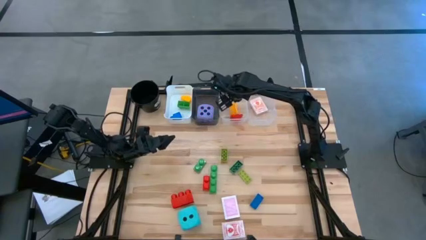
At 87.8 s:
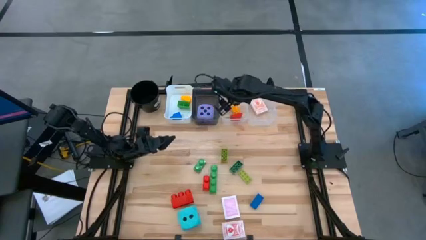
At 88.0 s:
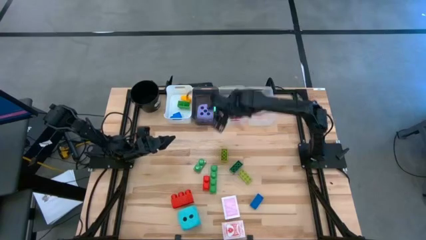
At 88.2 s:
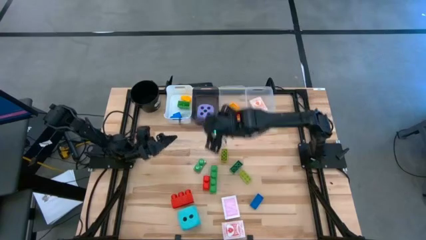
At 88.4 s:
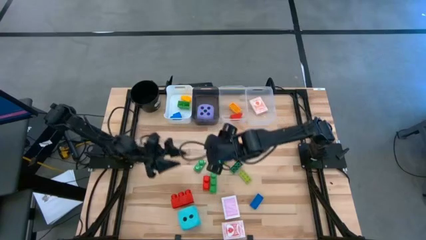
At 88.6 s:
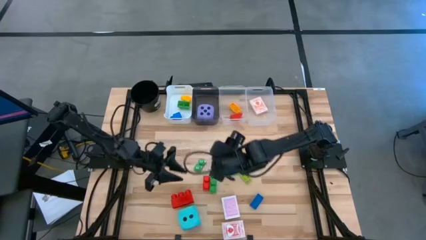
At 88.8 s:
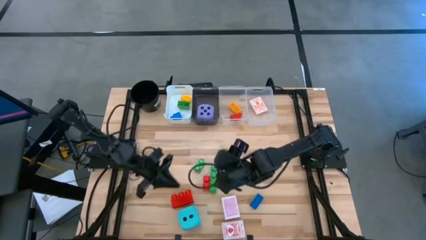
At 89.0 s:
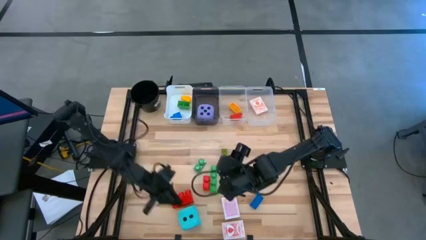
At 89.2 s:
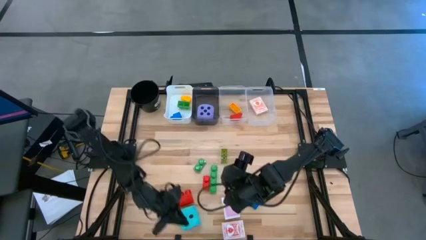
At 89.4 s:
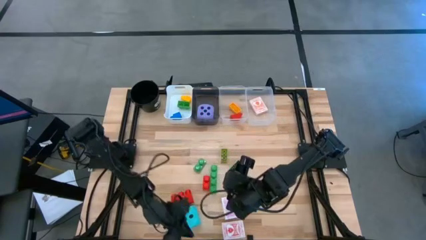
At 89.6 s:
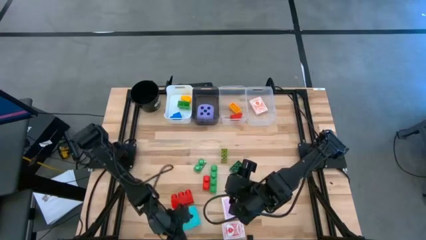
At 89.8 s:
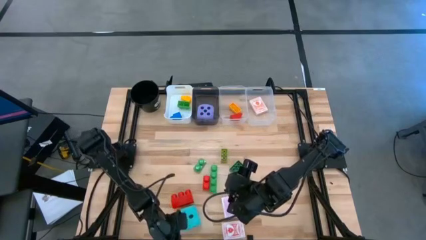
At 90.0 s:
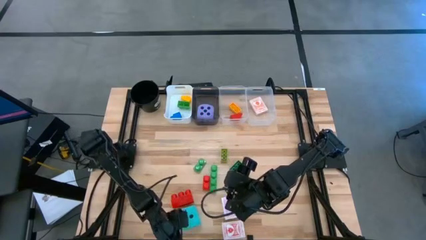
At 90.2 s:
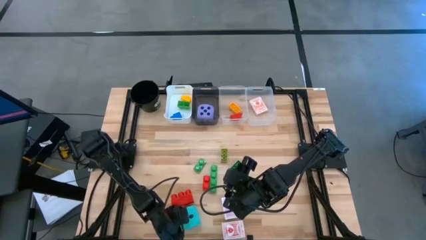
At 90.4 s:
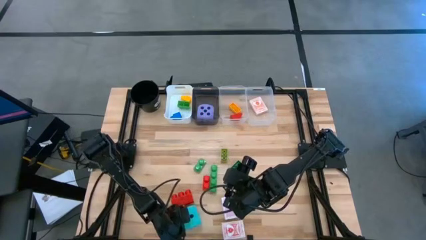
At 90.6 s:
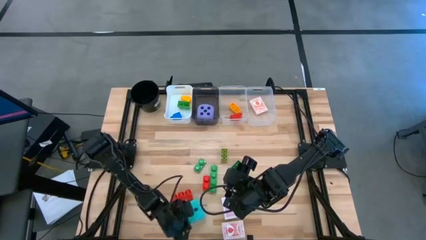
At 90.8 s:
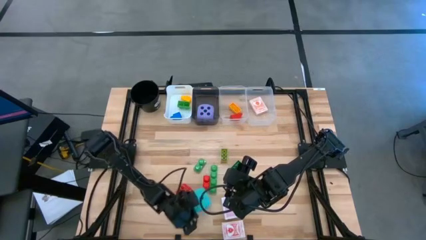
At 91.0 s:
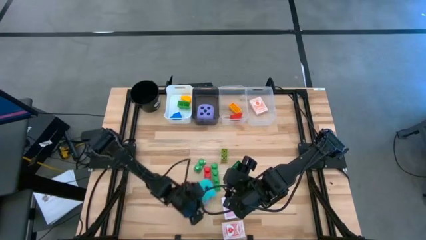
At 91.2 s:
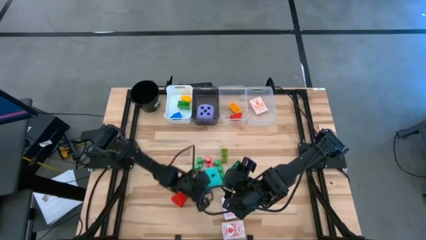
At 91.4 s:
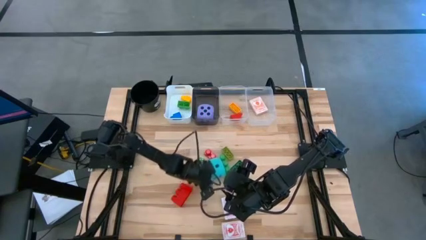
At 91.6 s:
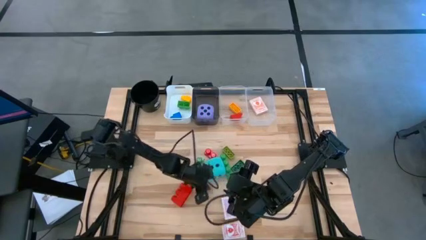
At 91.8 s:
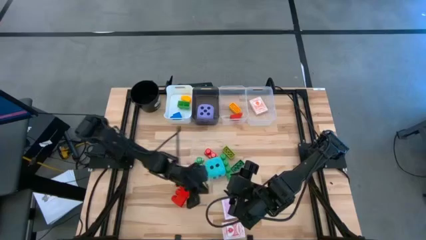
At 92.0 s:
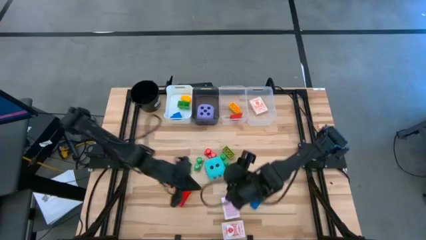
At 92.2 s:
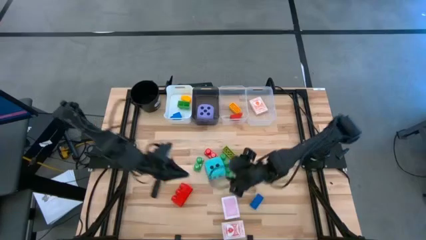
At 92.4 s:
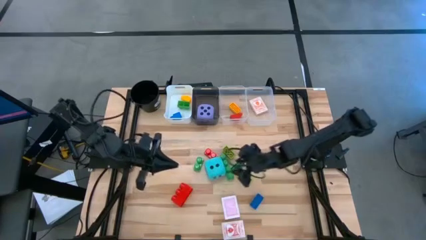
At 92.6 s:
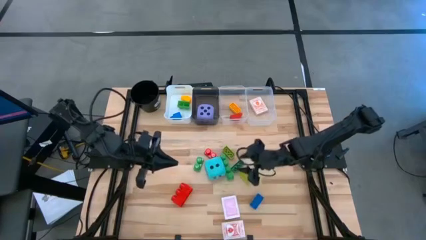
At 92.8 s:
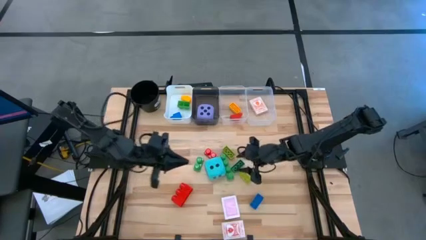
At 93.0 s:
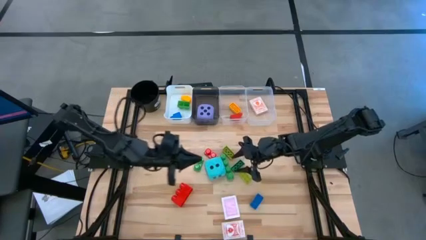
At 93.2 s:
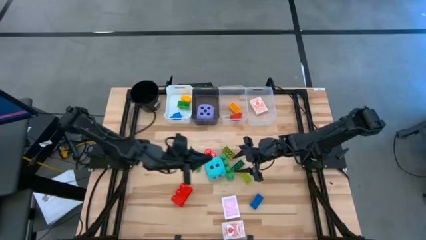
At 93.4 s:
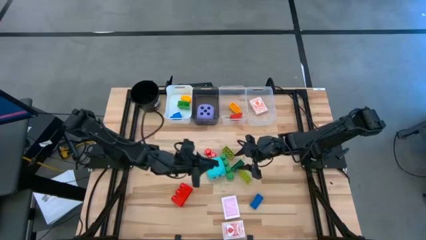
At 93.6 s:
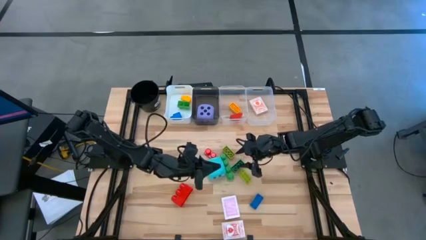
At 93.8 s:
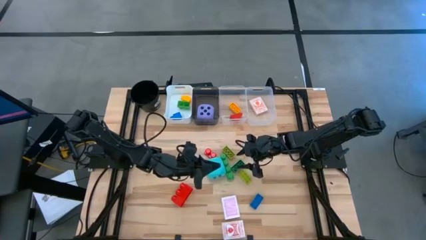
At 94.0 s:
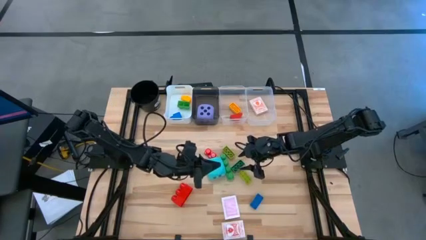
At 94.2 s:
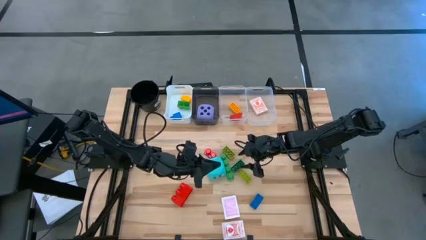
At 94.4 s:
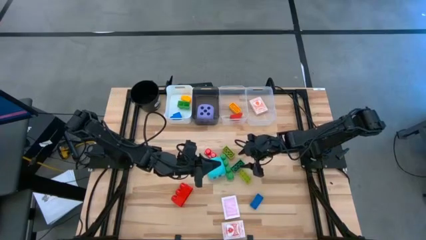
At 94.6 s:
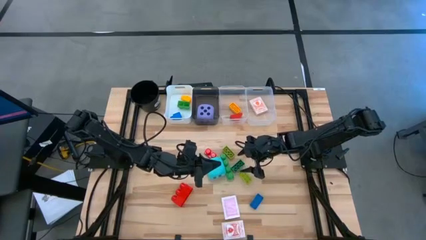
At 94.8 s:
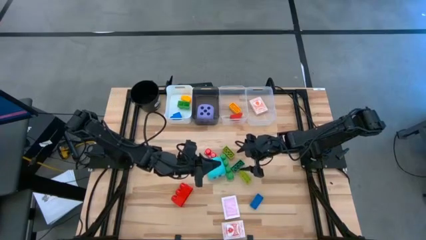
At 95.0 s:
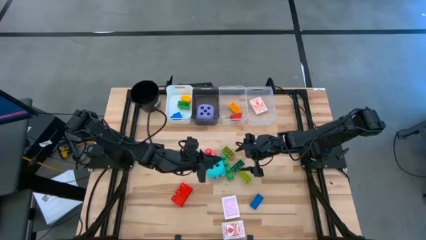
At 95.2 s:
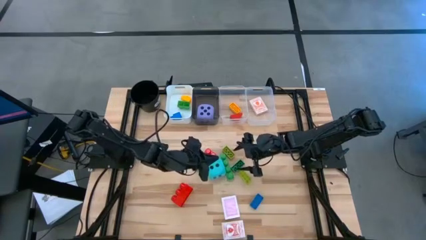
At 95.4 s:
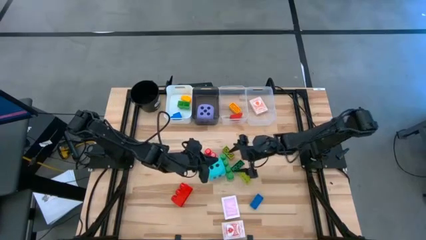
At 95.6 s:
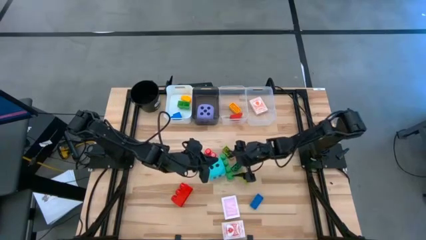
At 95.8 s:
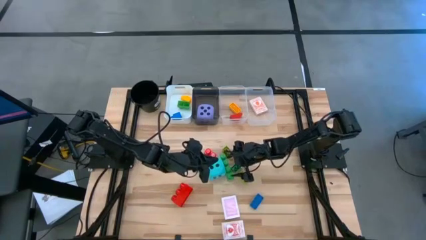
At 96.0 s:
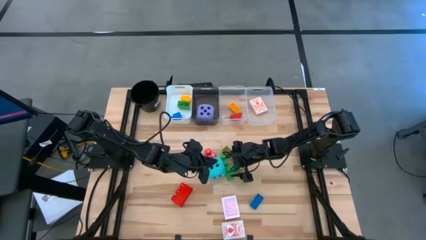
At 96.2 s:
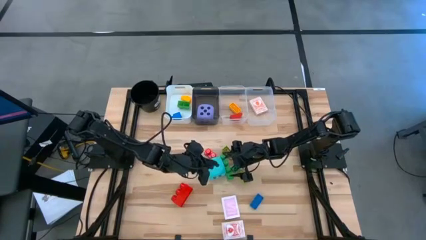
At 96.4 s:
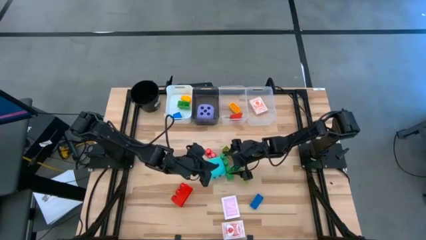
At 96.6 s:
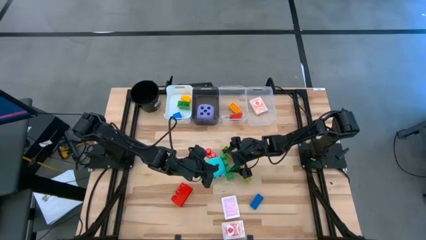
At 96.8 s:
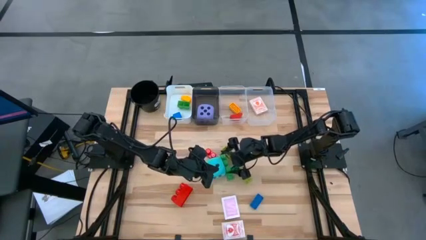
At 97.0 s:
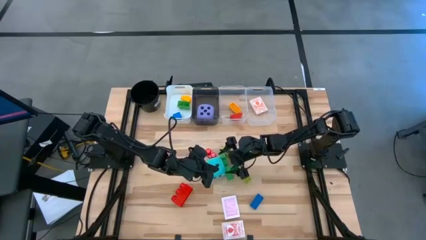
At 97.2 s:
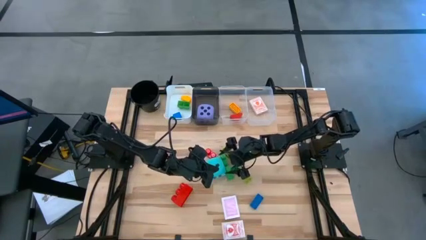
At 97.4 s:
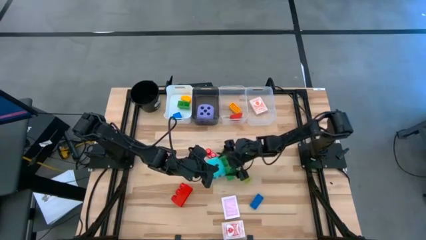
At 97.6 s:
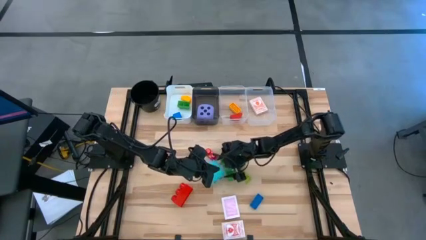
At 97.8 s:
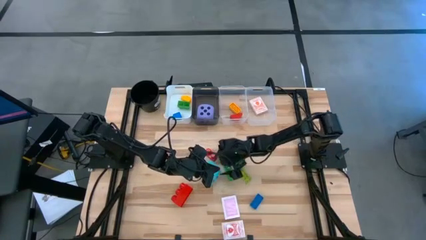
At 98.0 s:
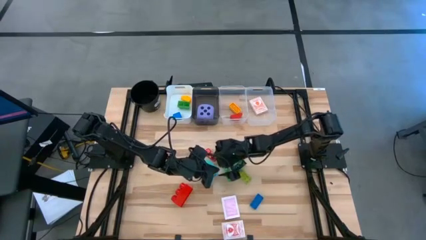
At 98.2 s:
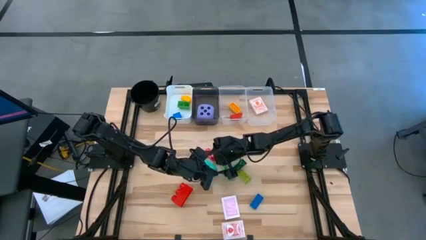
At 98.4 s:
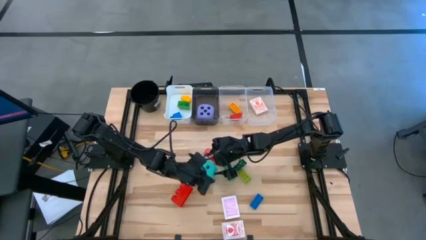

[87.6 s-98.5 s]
Task: Pick & Place Toys
Put the blue dice into the black transparent bin
